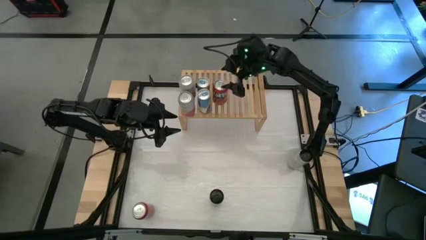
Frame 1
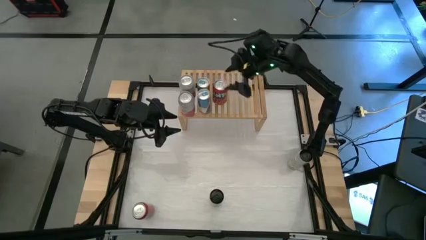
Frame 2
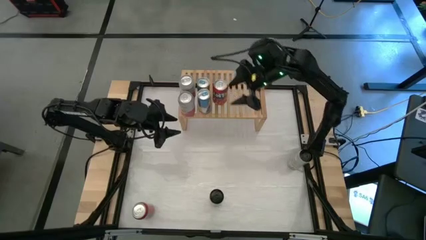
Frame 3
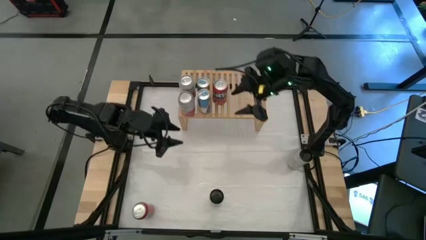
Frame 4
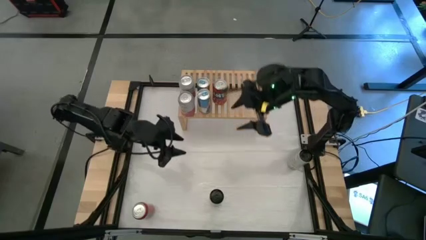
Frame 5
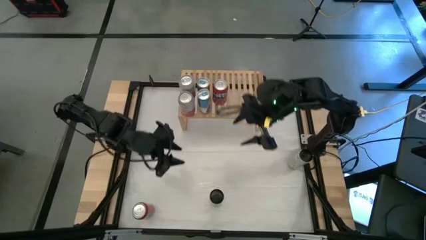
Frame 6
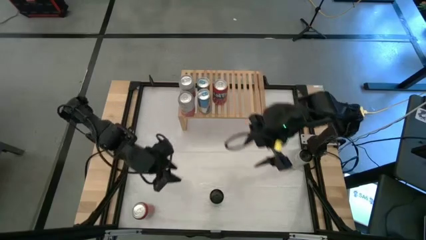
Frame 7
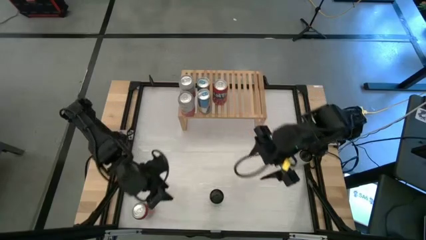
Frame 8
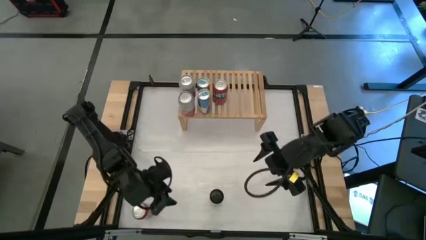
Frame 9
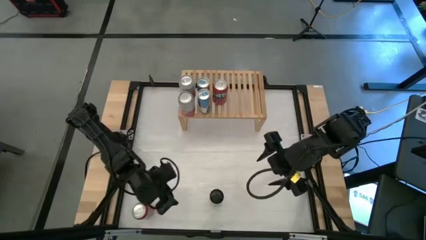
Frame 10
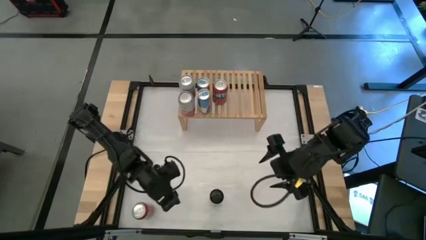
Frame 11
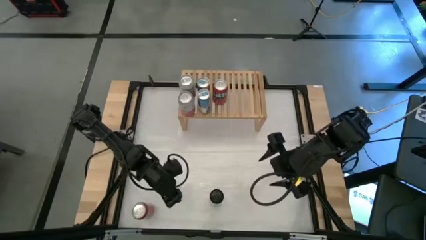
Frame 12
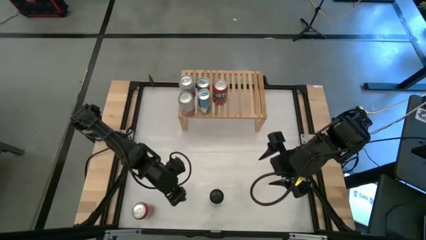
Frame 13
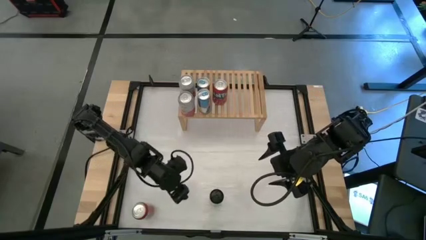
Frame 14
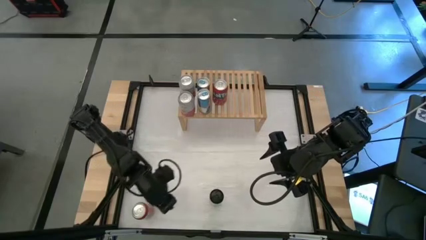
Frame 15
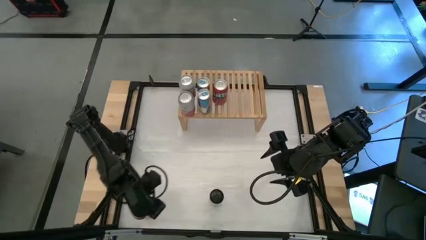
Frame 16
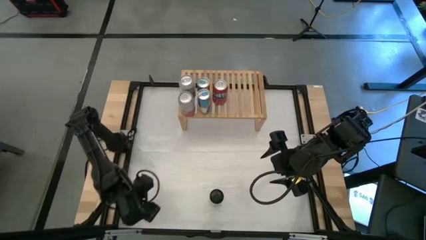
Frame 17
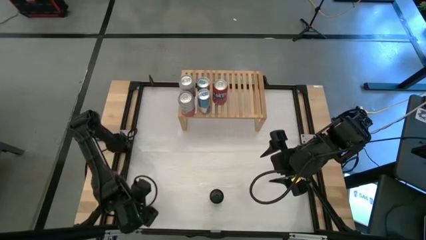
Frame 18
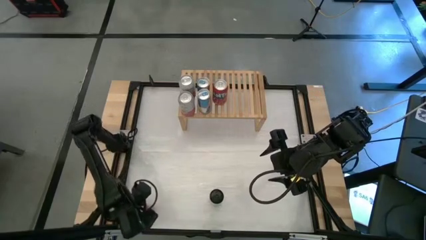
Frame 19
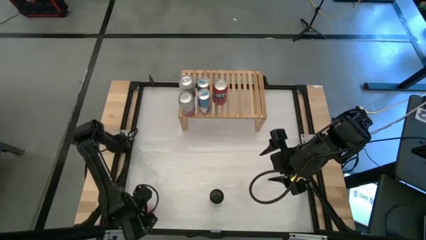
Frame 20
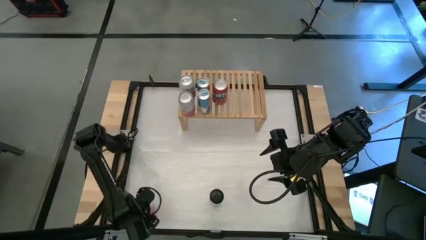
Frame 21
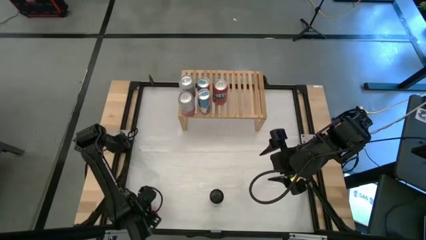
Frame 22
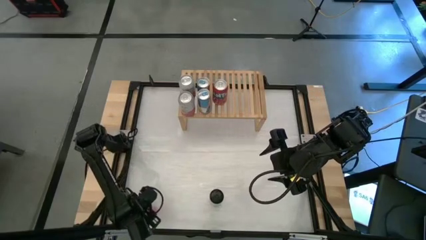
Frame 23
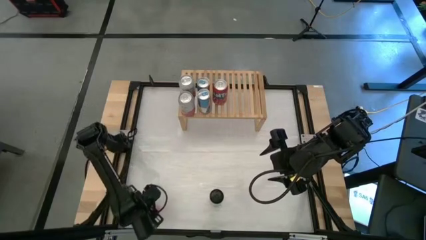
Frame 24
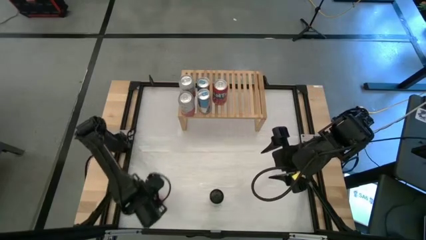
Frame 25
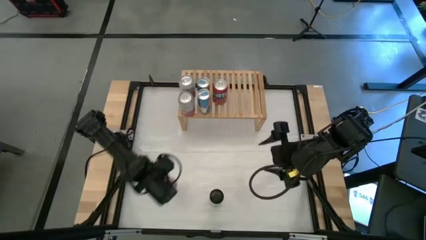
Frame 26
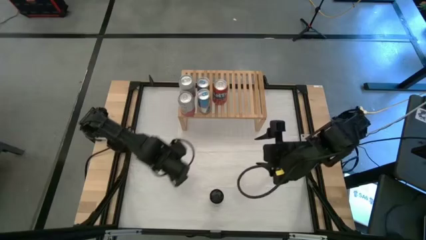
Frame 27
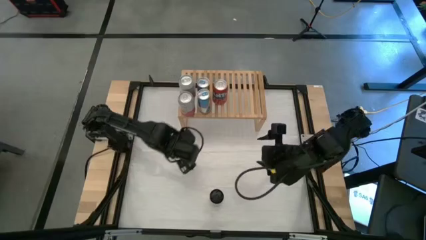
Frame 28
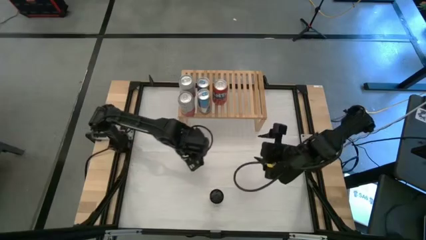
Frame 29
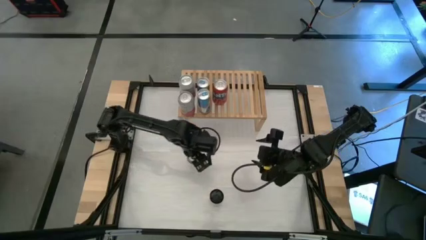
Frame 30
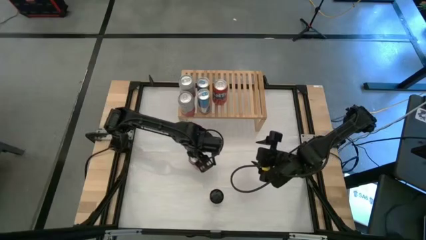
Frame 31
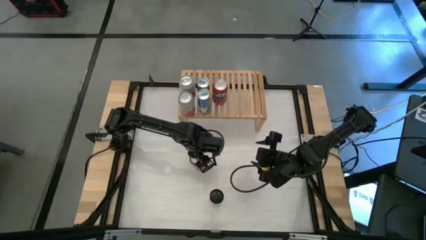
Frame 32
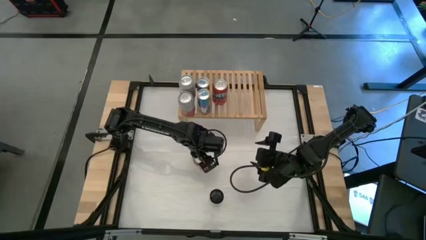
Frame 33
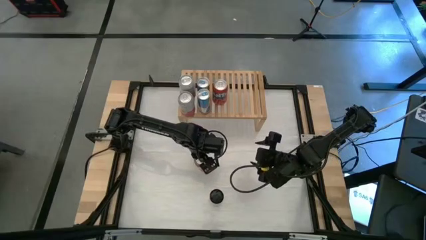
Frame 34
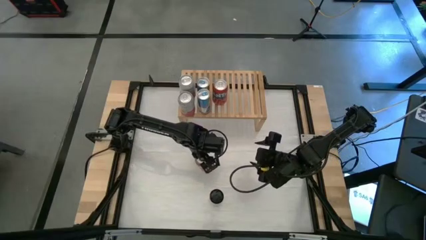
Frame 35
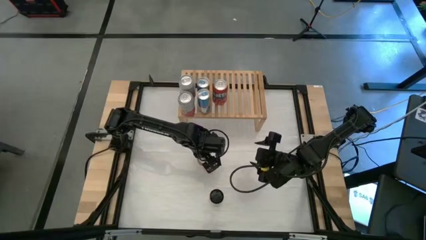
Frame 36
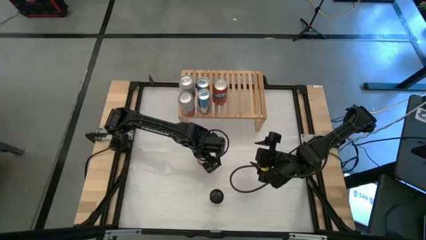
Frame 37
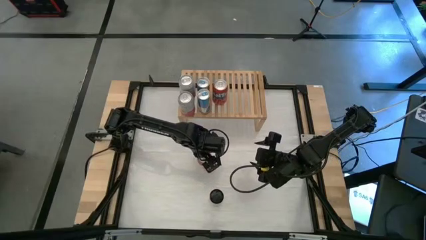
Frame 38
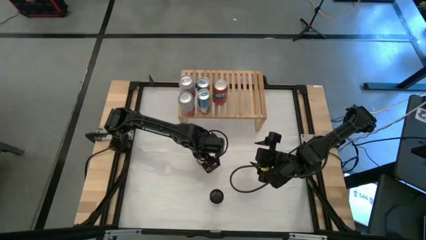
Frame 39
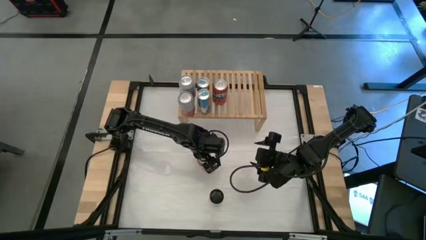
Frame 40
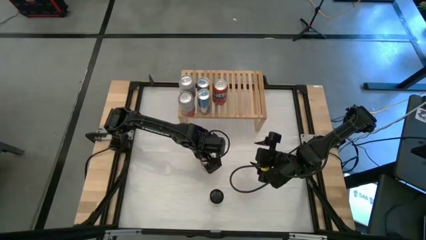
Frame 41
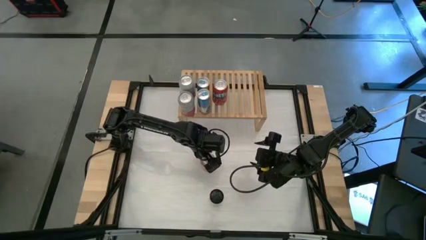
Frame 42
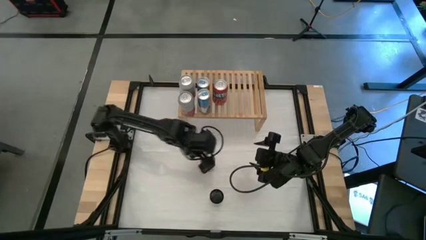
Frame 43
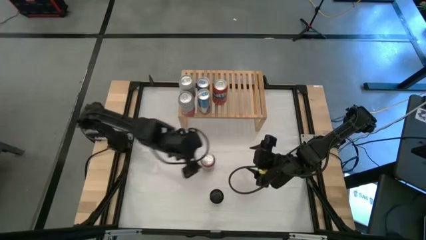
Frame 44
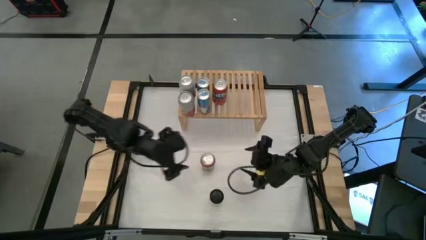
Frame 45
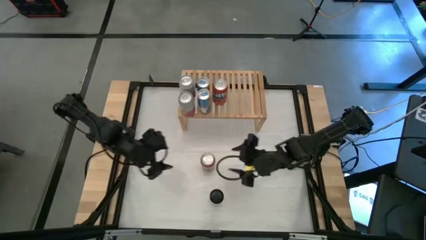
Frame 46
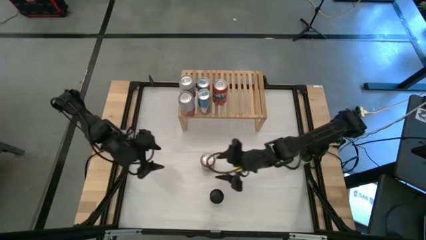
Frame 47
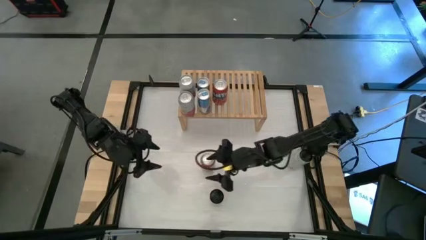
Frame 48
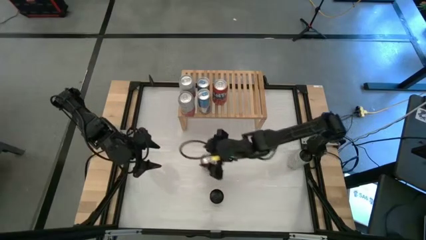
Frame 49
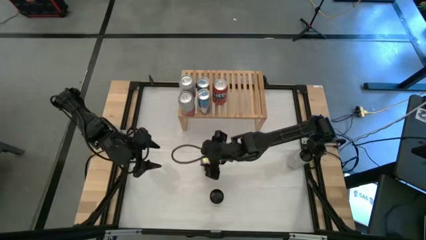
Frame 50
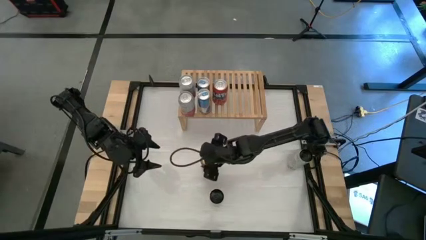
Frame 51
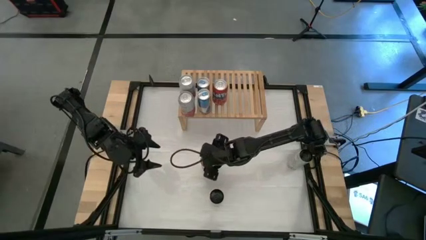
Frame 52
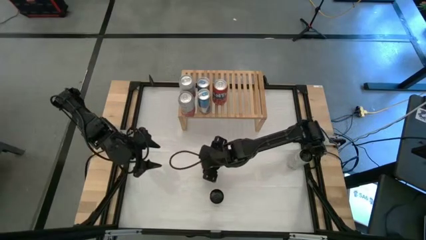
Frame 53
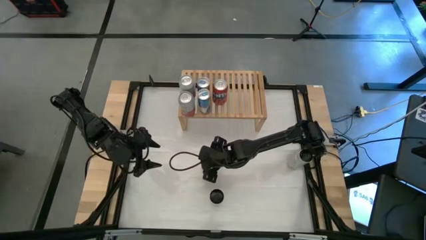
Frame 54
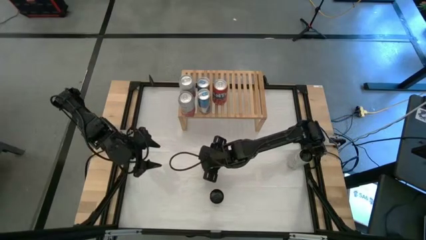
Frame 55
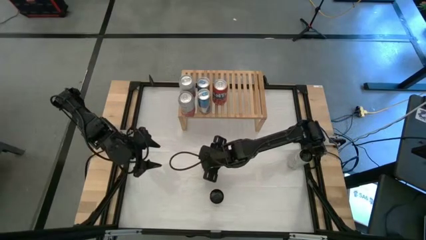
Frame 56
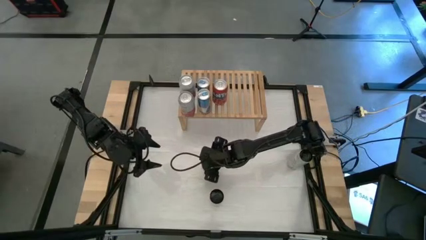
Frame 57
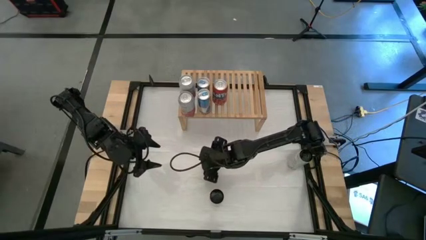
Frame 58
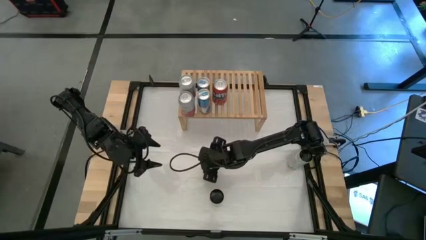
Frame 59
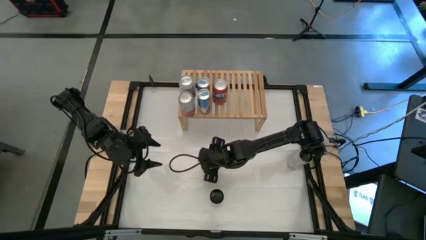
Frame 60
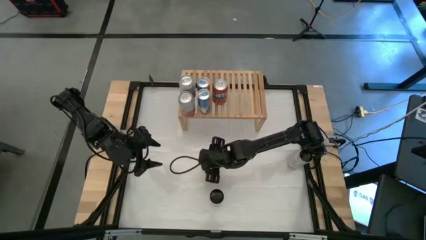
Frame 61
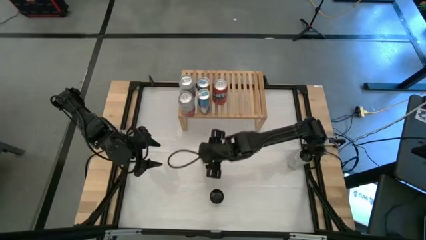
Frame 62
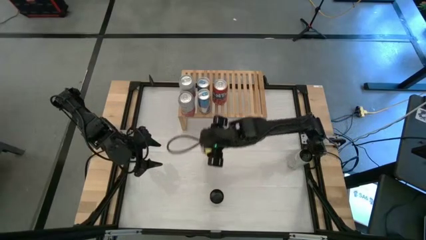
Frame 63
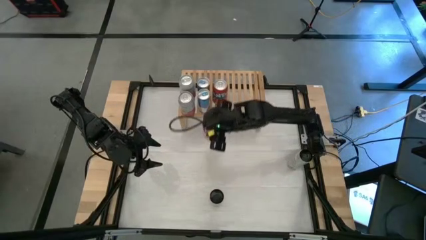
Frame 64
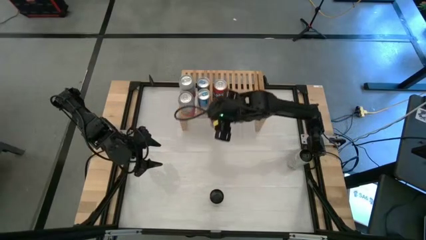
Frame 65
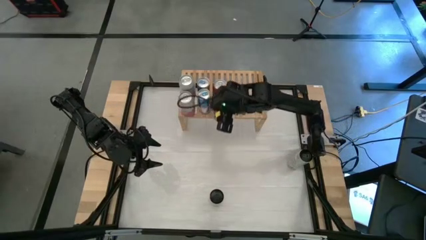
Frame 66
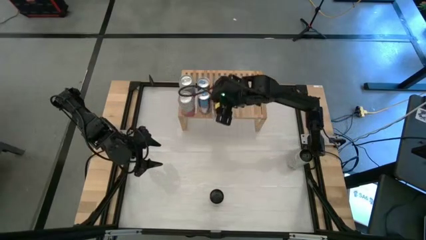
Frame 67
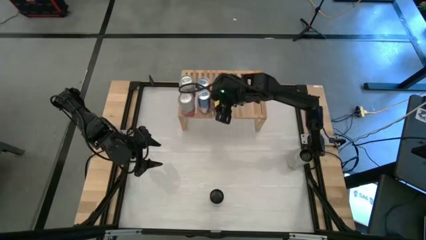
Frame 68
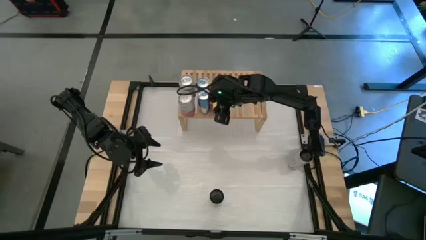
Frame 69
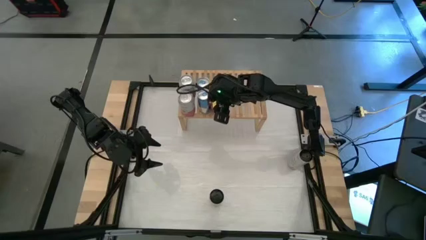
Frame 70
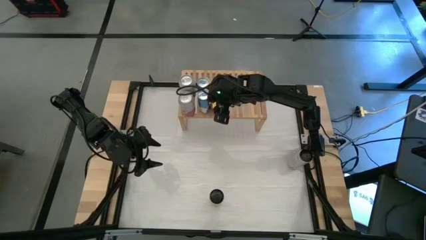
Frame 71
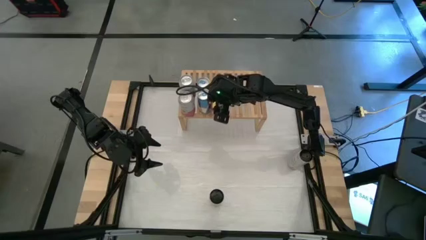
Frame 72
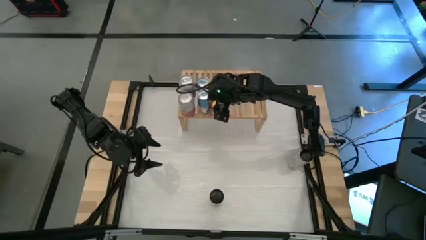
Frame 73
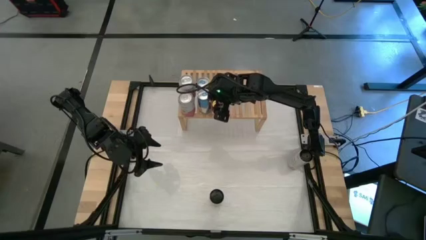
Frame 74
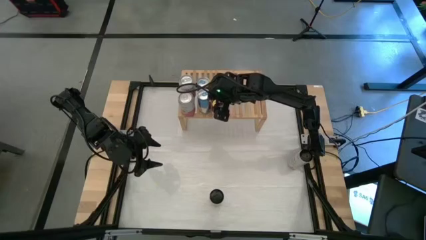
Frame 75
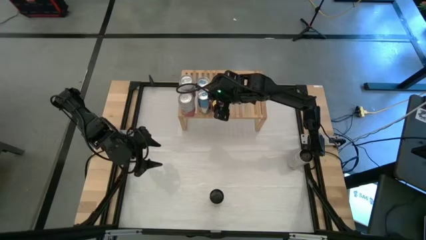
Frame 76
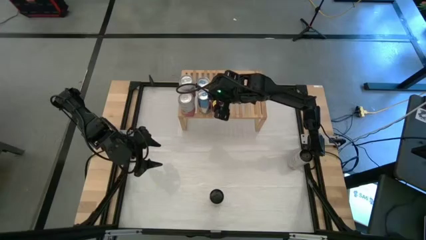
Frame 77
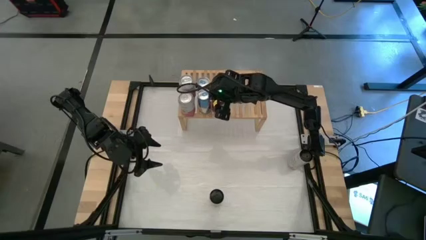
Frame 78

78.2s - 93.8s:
Task: Place canned beverage on shelf
Put the red soda can on the shelf aligned with the other red soda can
